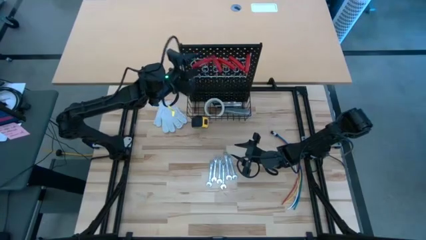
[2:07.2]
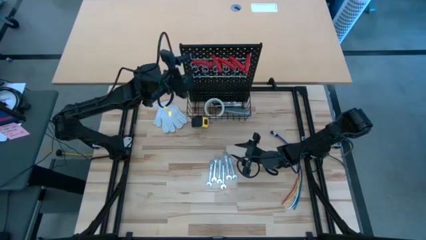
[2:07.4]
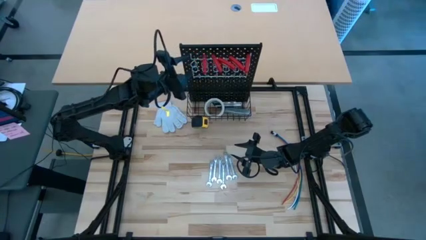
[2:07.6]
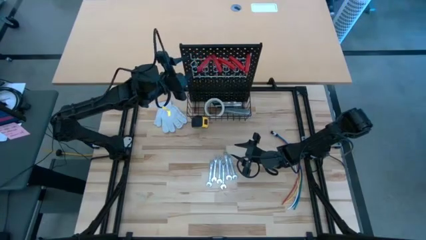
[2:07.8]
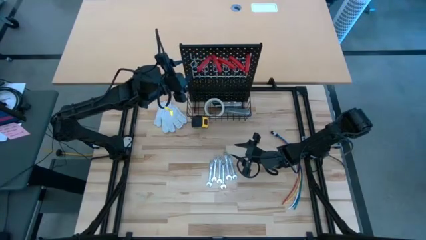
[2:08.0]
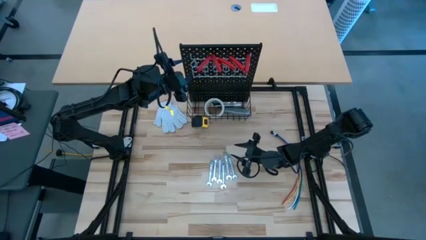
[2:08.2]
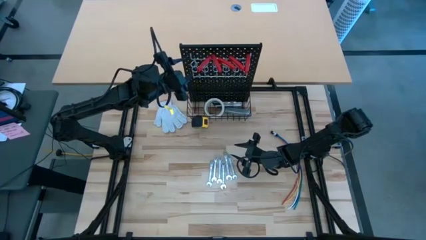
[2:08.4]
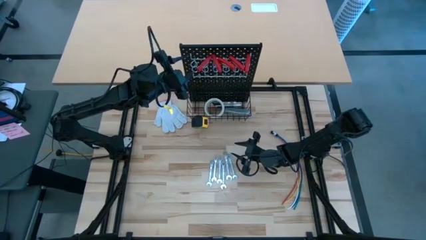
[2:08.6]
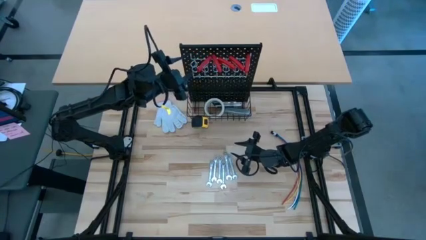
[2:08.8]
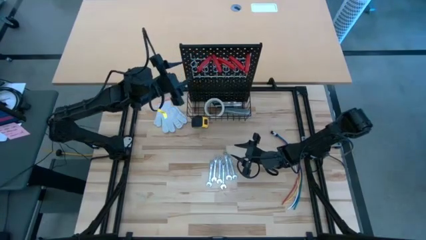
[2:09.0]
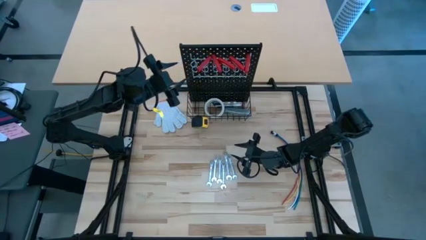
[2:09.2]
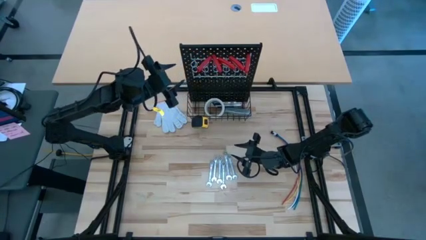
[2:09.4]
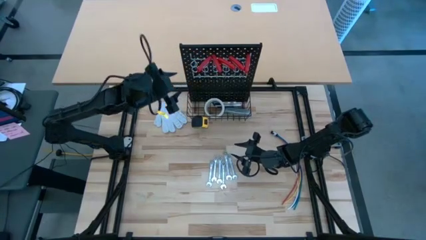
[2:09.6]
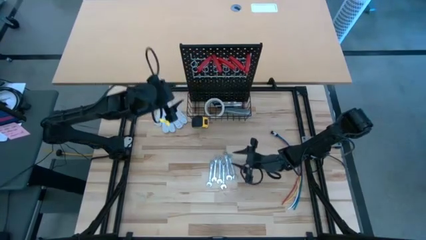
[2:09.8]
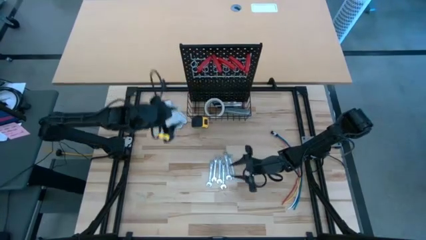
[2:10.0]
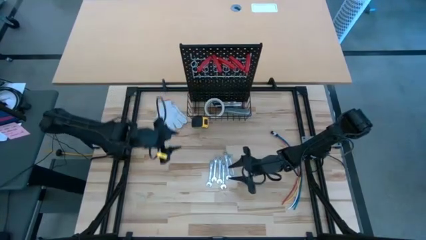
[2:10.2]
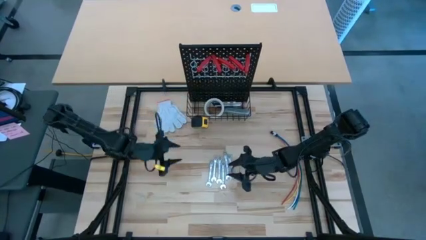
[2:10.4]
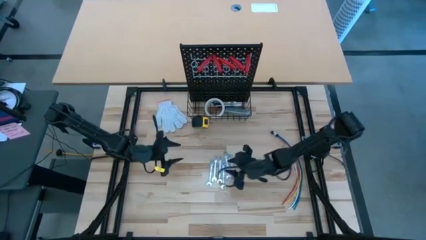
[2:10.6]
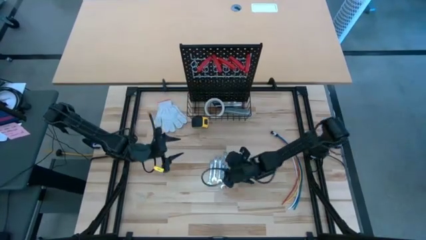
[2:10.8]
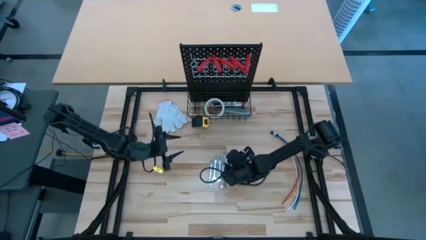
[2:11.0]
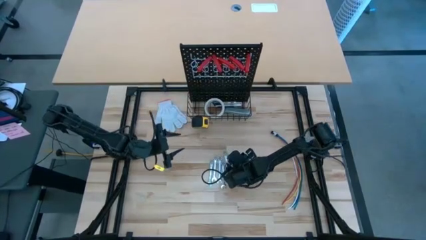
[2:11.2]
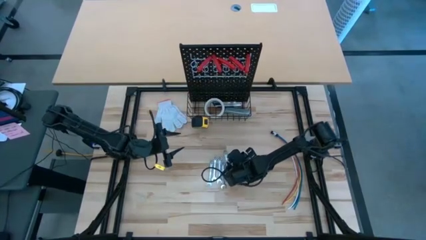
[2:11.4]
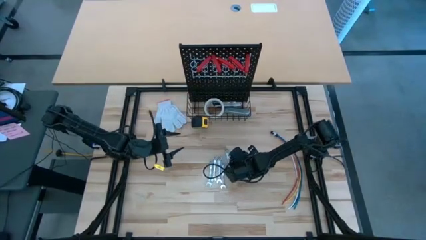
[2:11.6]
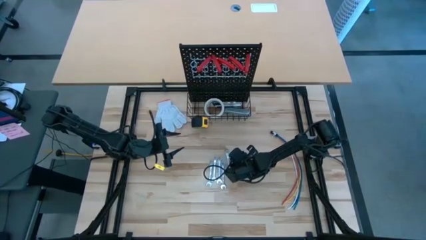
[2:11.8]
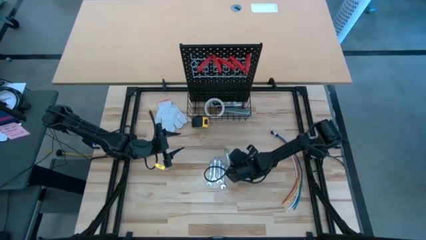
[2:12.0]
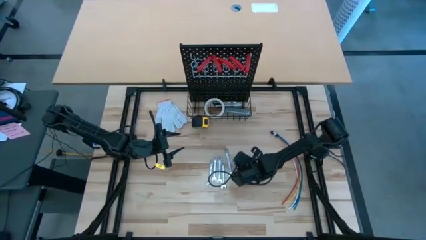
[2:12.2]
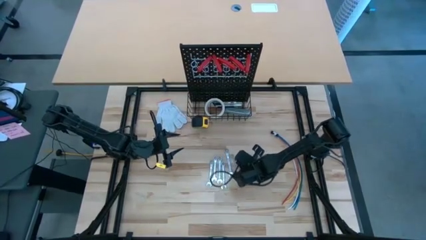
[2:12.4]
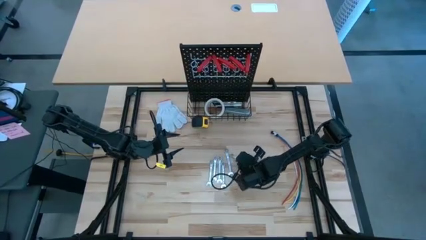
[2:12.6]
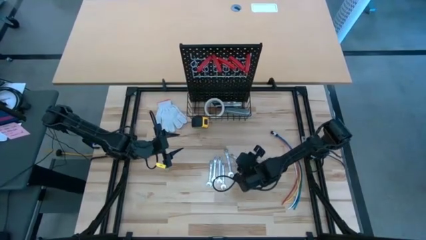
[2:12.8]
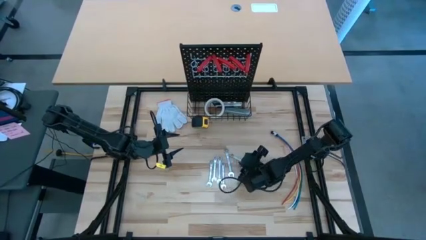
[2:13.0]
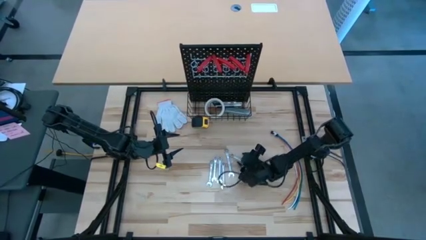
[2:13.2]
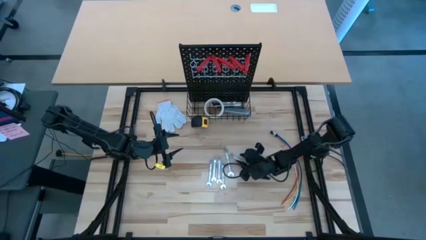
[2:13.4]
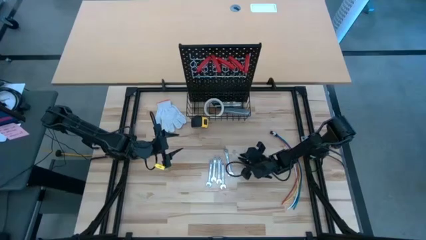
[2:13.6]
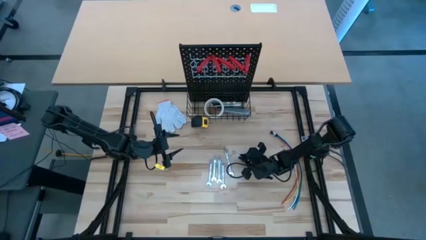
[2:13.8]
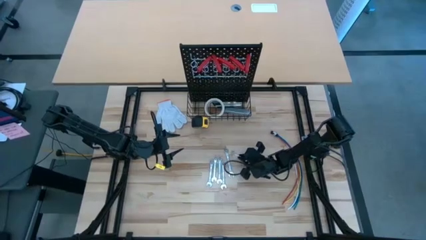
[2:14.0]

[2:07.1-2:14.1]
Task: Hang tools onto peg board
Hang the silver wrench on the pegboard

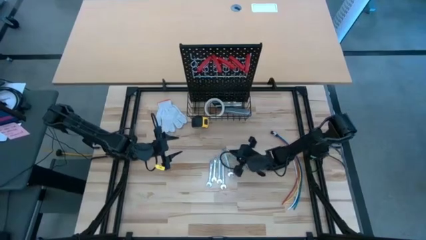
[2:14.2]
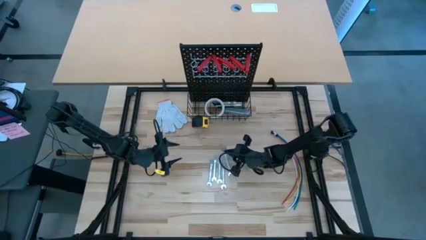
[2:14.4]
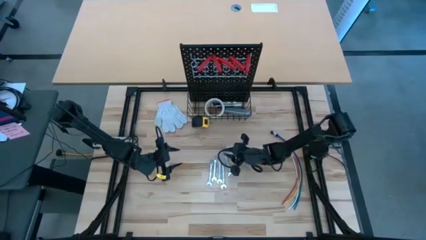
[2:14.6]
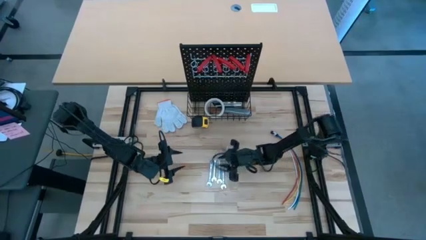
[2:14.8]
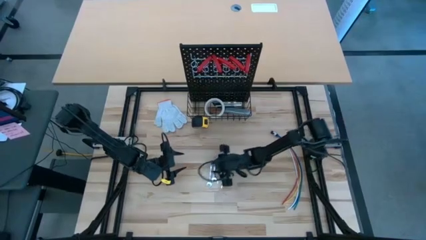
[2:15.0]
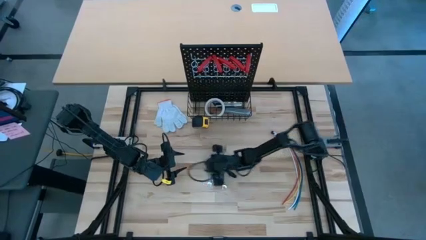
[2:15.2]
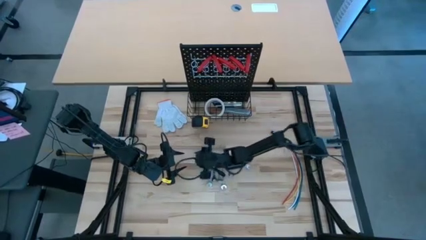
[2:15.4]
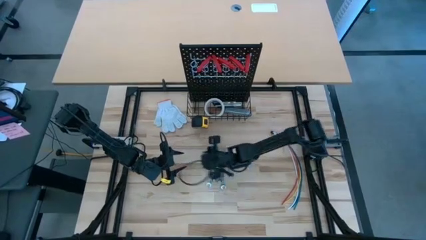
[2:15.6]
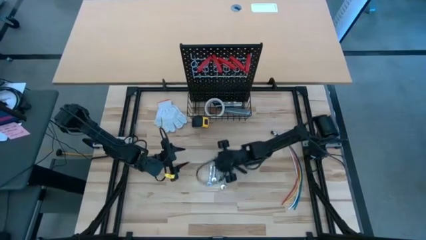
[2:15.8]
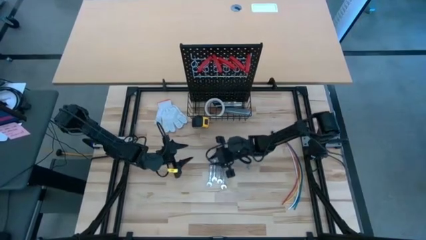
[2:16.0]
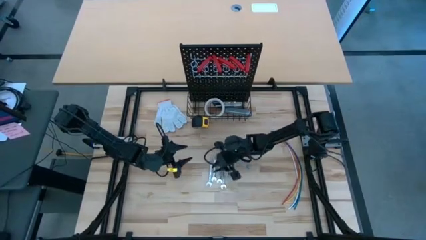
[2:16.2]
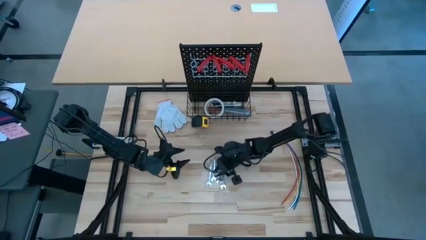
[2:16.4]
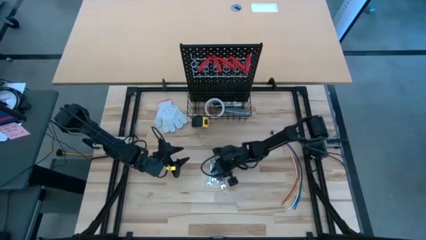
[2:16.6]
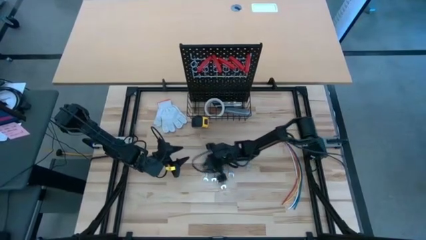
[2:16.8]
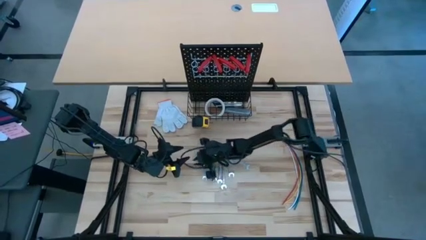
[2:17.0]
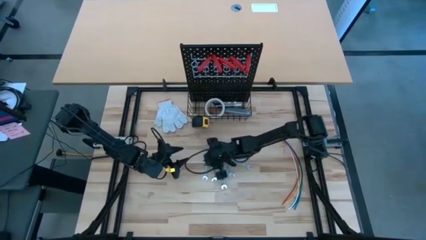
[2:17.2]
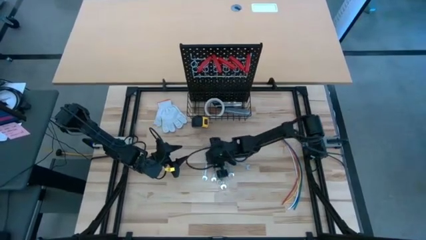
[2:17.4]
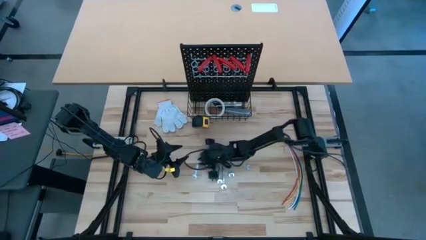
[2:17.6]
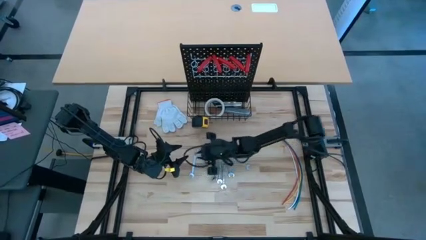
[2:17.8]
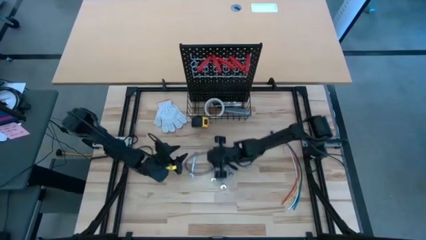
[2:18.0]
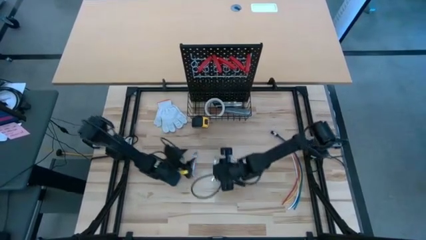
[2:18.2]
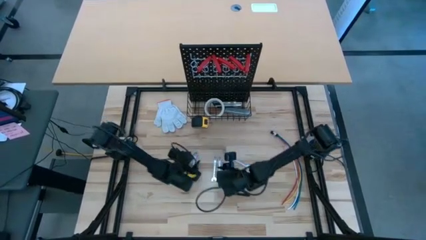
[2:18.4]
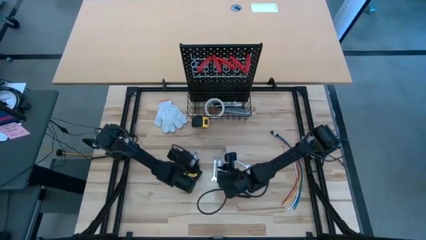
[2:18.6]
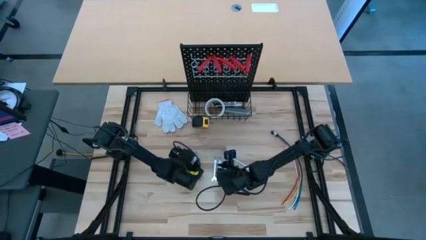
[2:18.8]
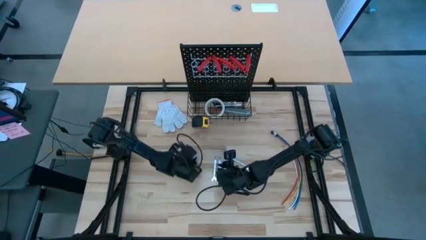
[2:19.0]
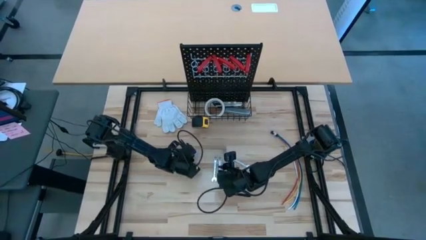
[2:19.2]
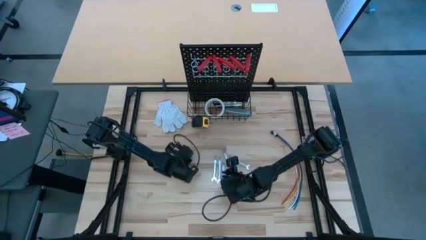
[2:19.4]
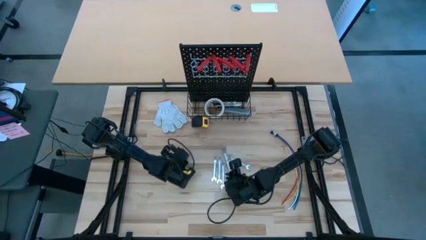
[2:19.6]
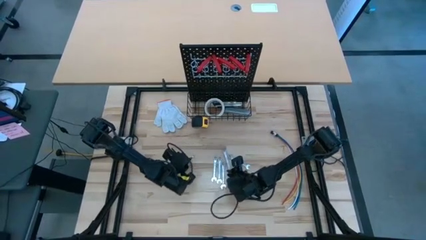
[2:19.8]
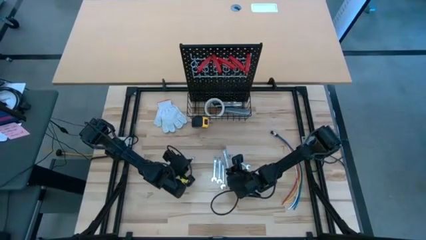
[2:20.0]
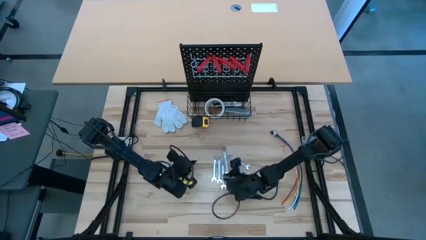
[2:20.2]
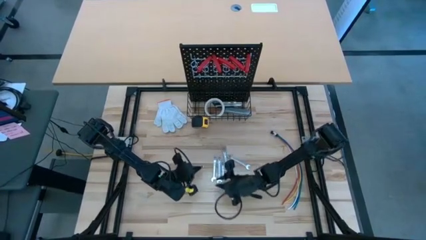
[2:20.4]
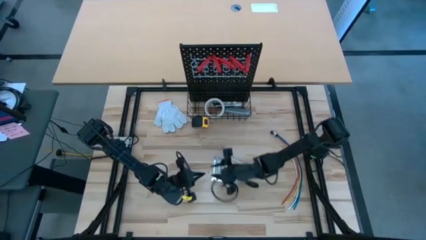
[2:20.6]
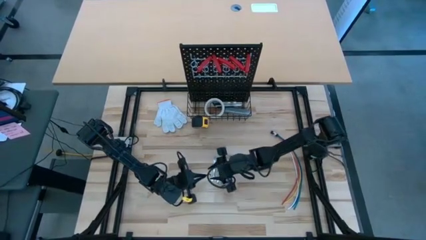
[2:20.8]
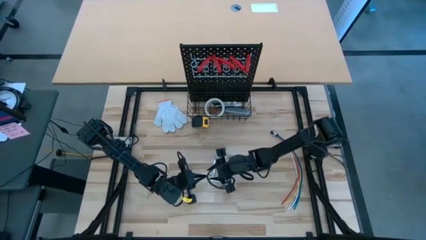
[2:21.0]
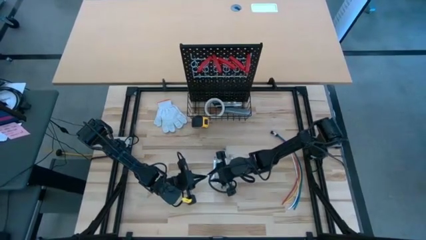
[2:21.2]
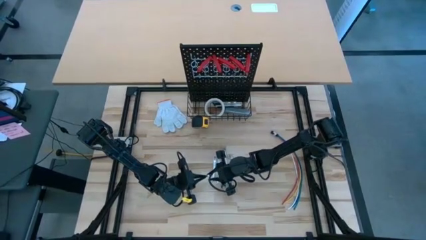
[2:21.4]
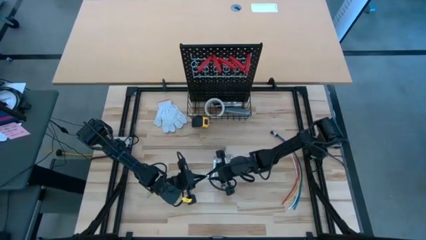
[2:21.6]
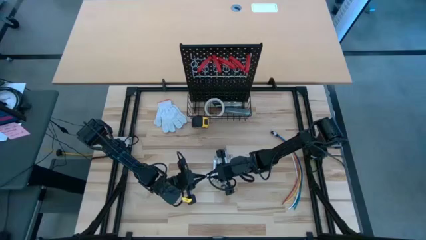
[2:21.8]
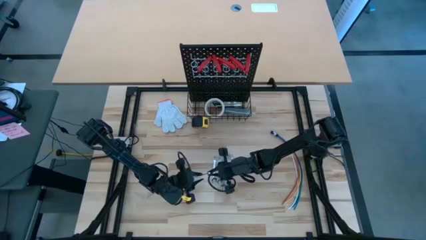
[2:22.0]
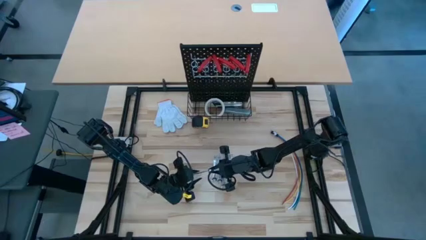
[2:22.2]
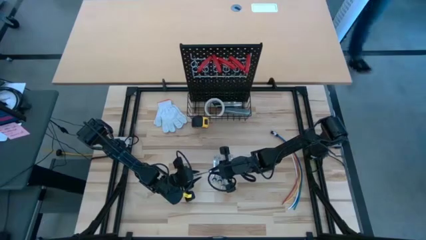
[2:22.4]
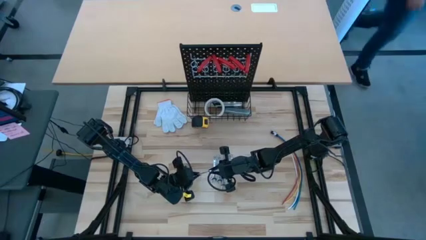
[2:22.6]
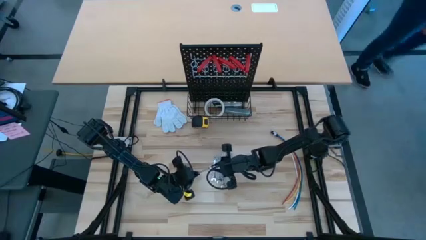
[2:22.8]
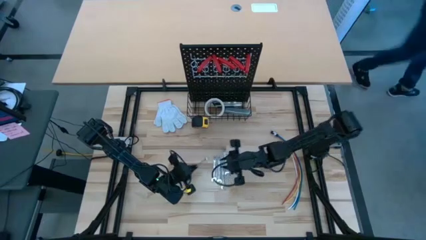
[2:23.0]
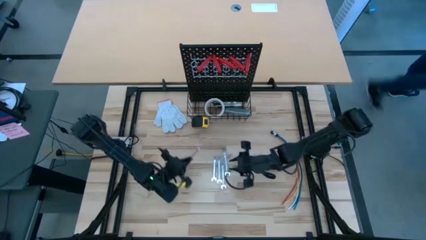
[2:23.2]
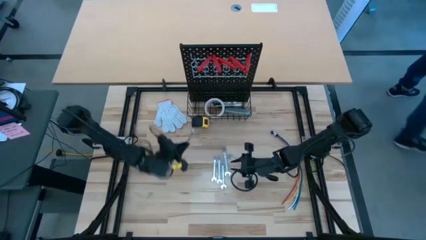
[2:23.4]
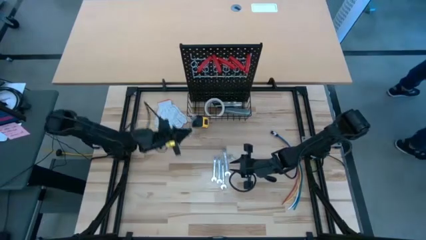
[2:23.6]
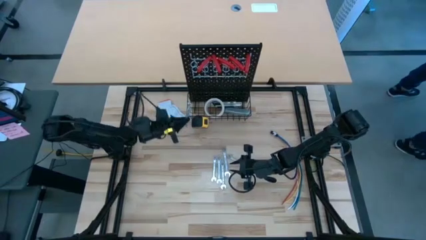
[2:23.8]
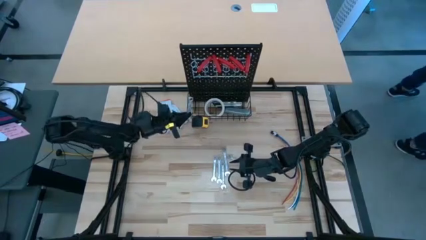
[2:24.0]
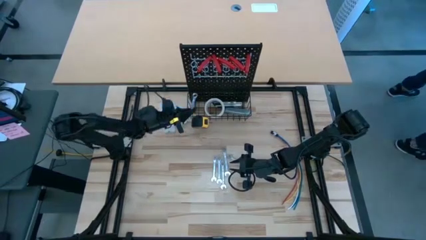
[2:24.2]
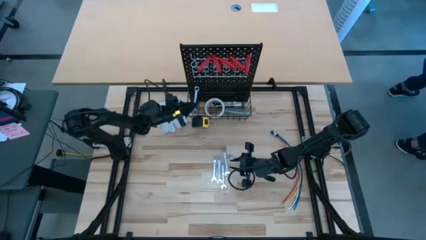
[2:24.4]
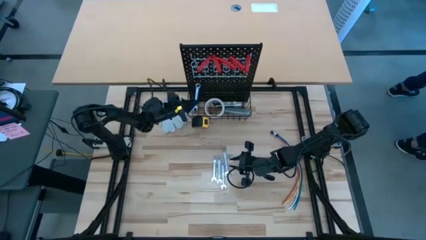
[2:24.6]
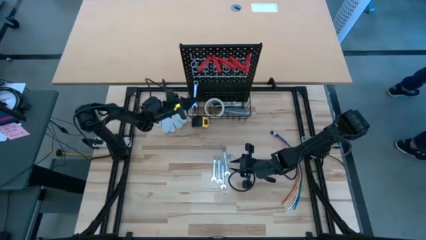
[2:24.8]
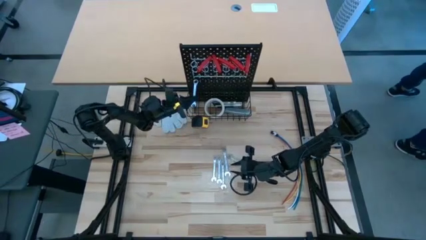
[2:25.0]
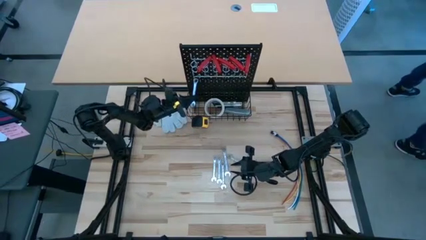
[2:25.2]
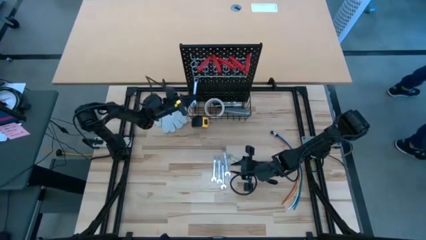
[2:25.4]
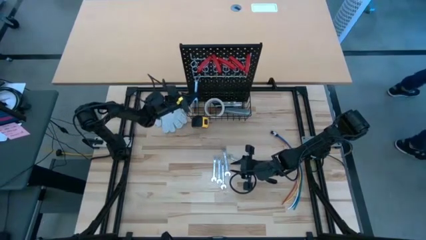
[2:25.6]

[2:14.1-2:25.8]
Hang the silver wrench on the pegboard
